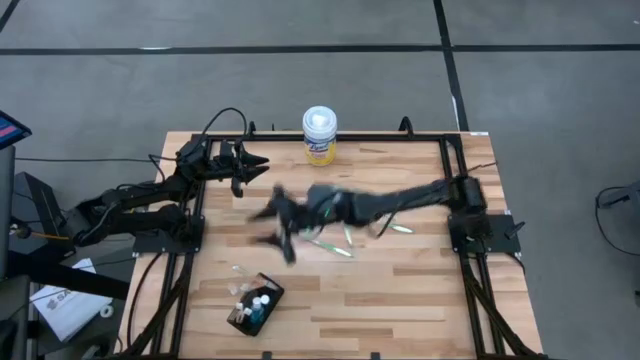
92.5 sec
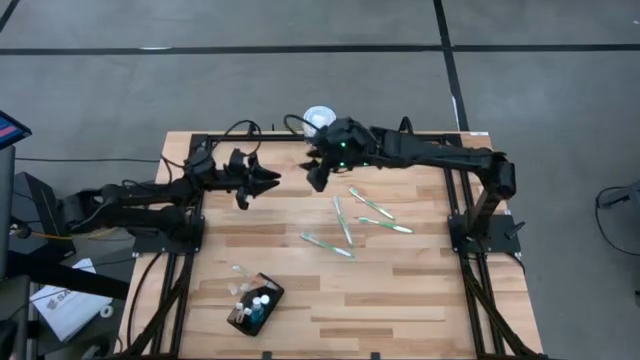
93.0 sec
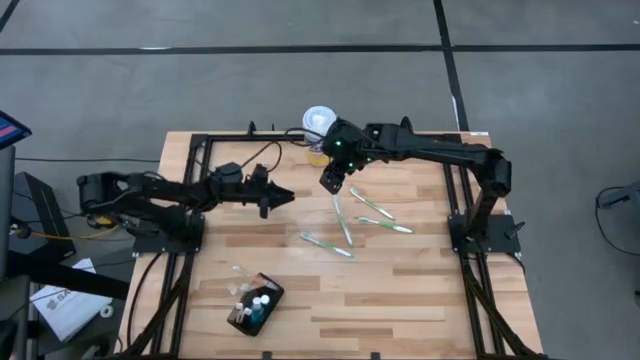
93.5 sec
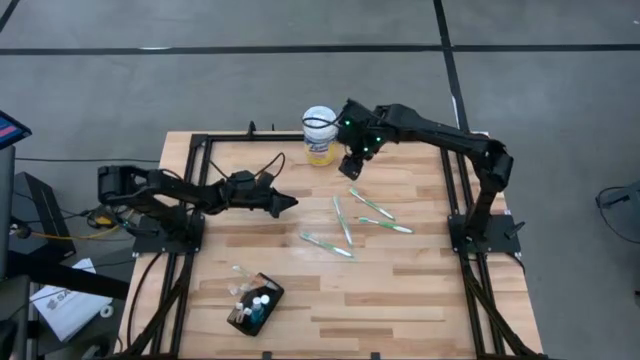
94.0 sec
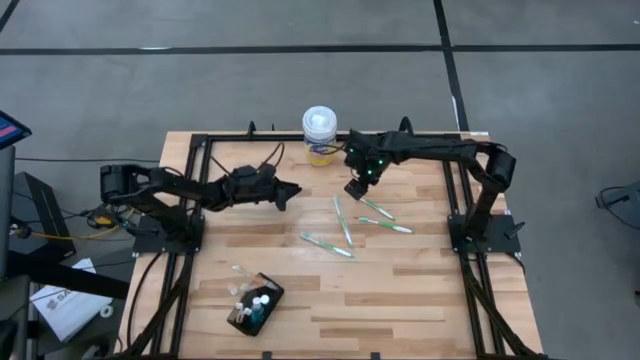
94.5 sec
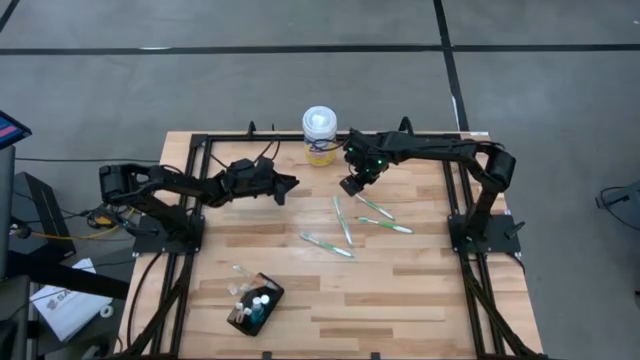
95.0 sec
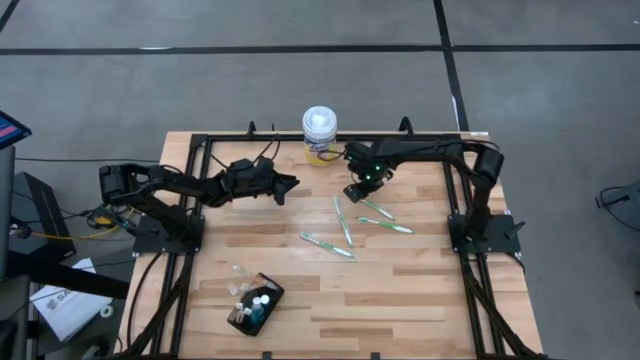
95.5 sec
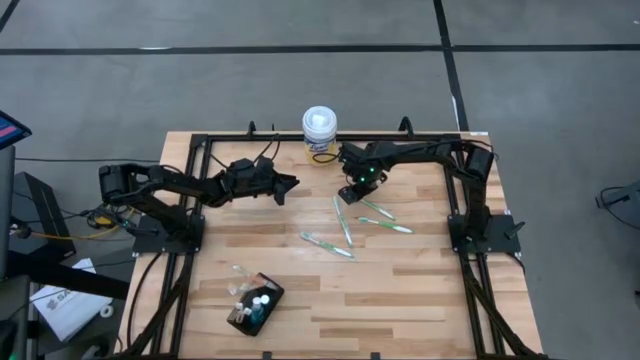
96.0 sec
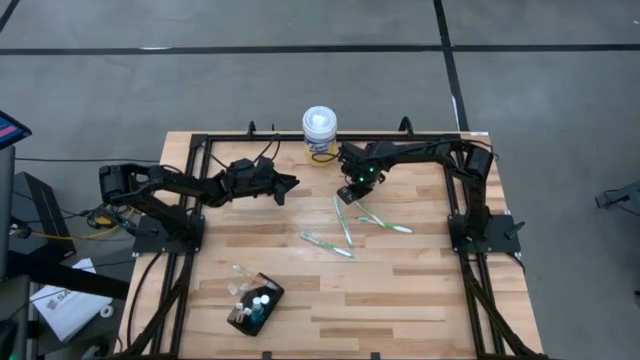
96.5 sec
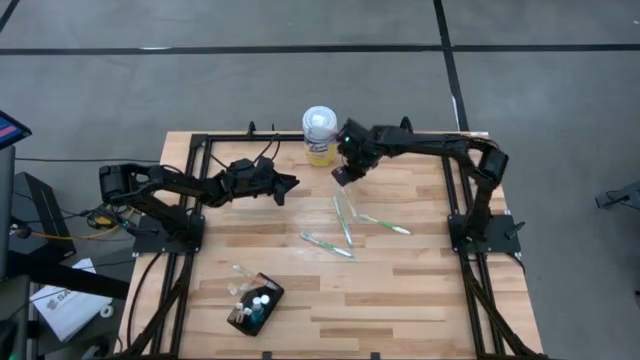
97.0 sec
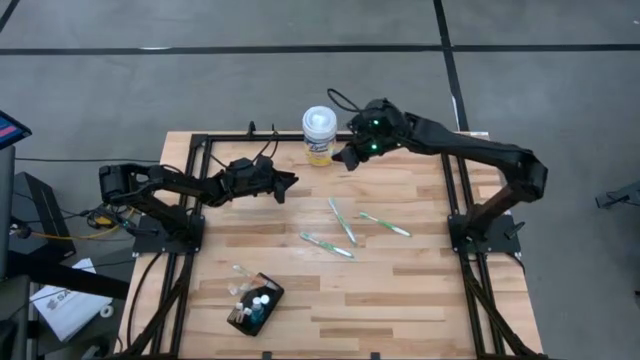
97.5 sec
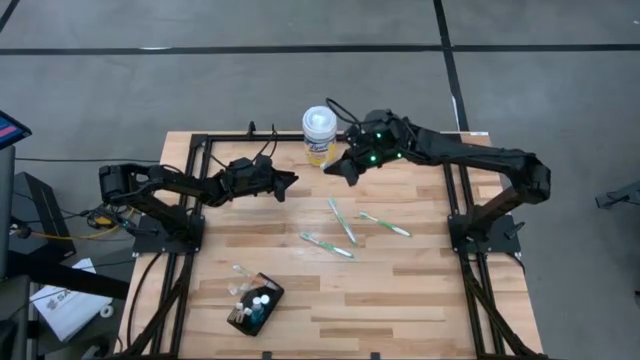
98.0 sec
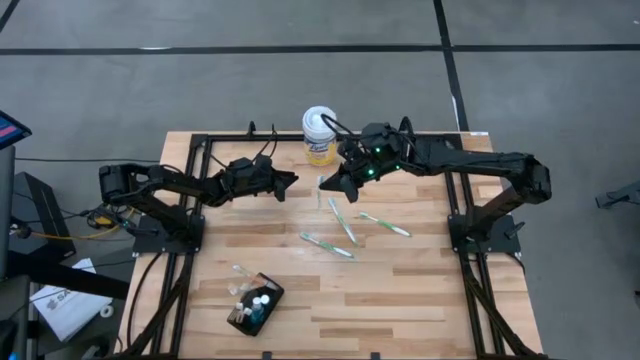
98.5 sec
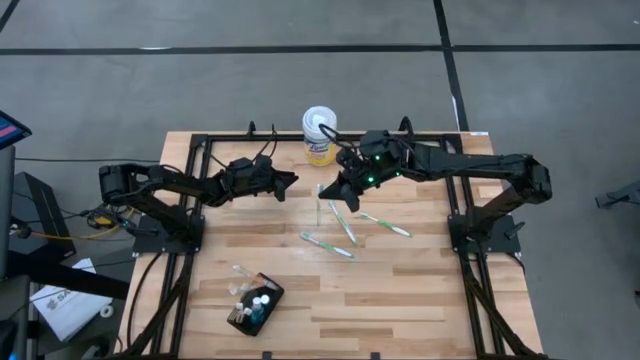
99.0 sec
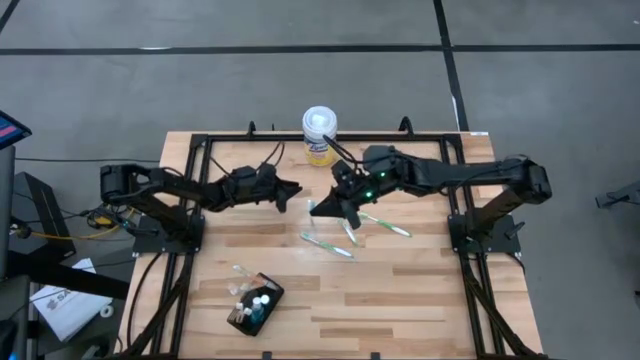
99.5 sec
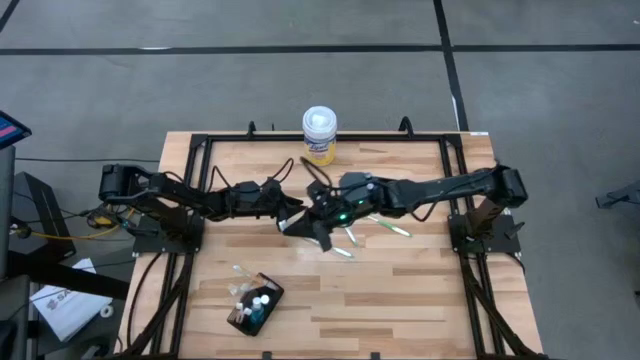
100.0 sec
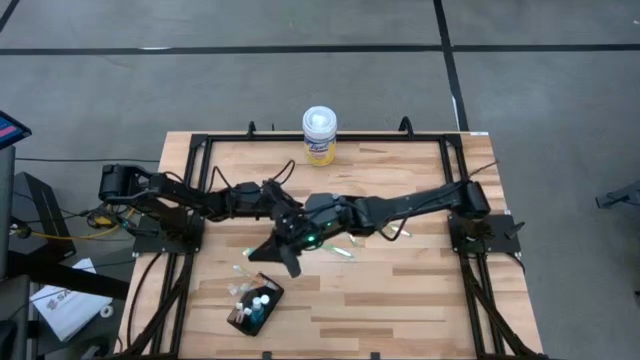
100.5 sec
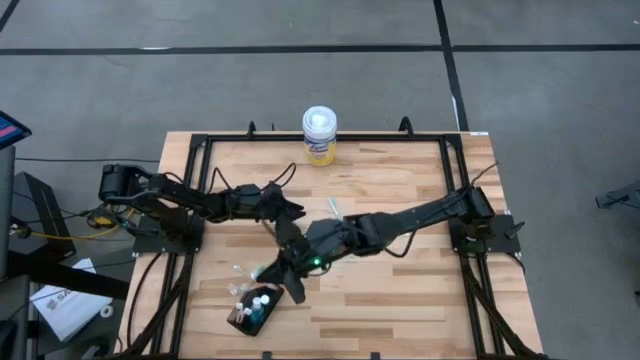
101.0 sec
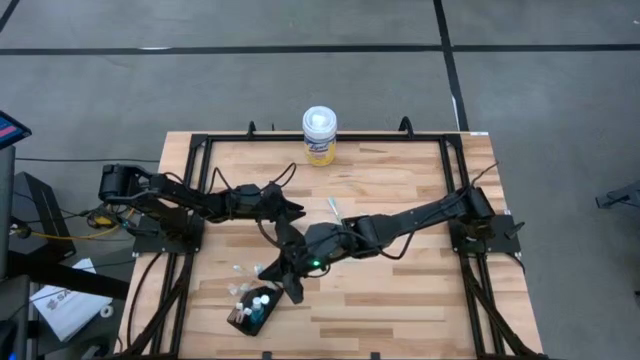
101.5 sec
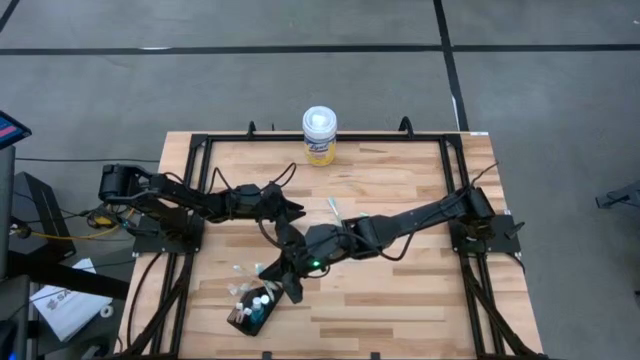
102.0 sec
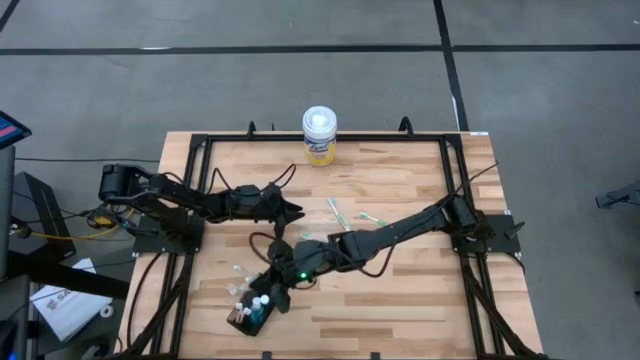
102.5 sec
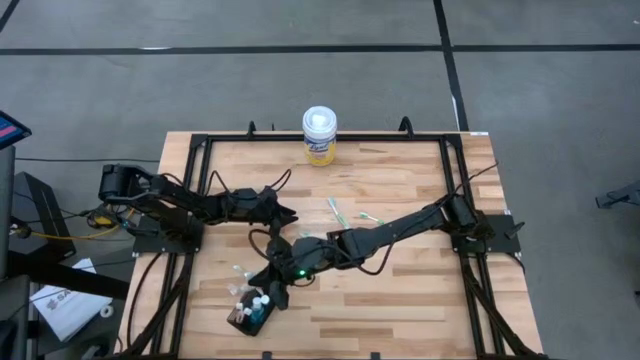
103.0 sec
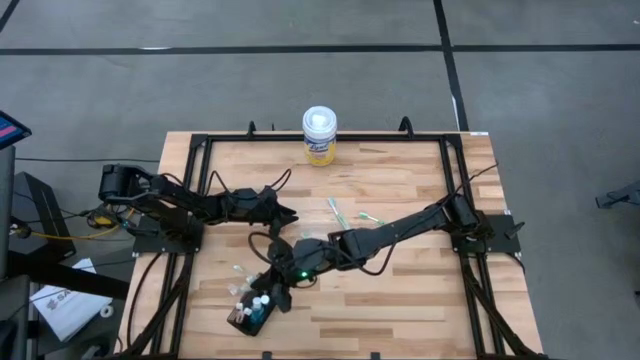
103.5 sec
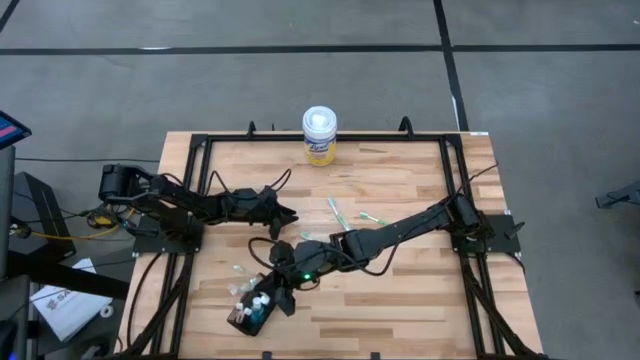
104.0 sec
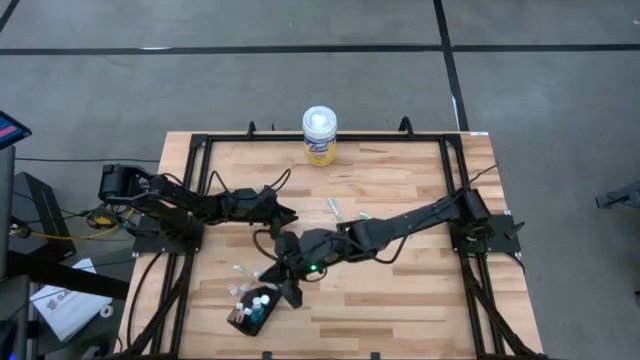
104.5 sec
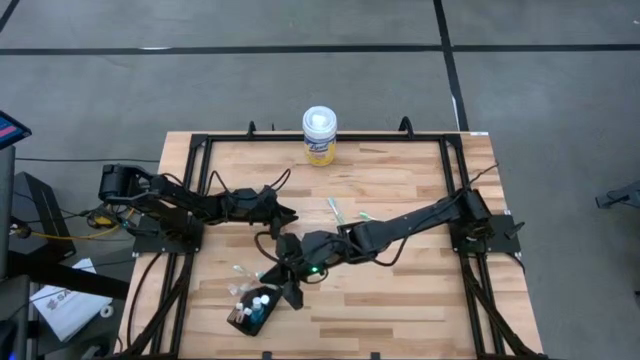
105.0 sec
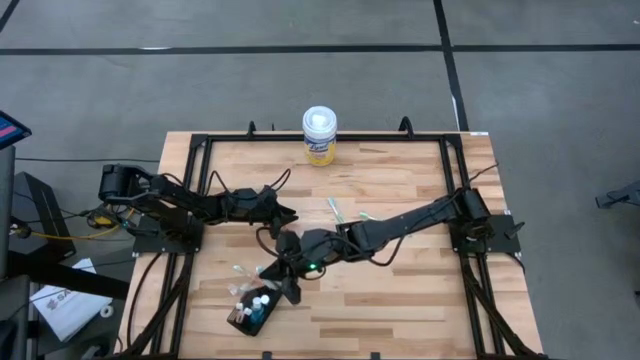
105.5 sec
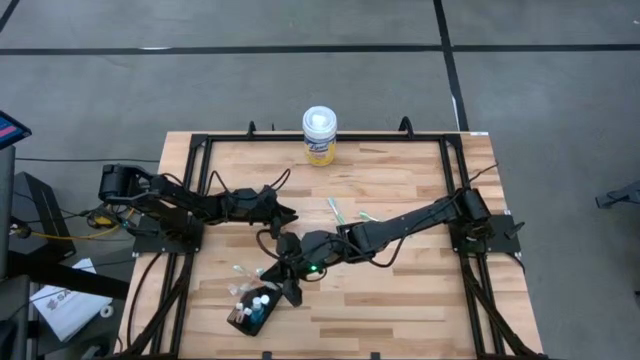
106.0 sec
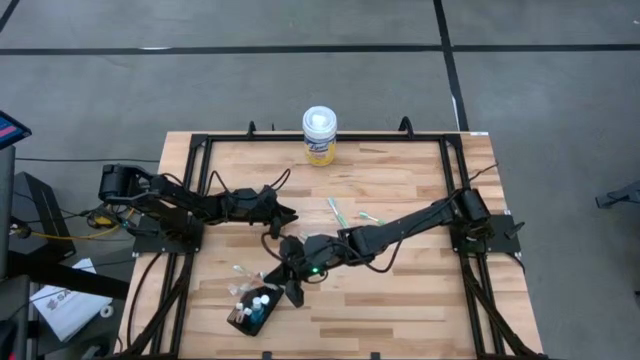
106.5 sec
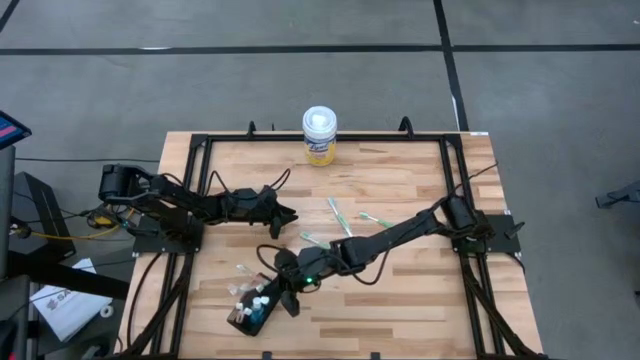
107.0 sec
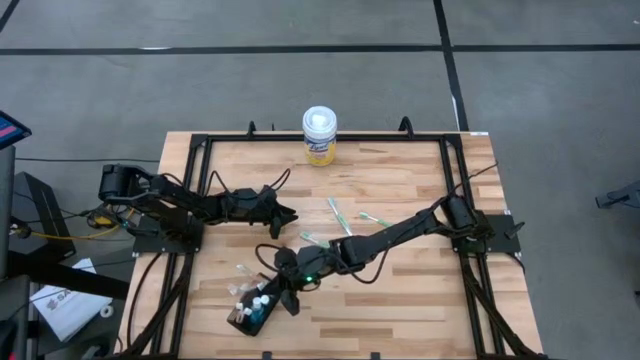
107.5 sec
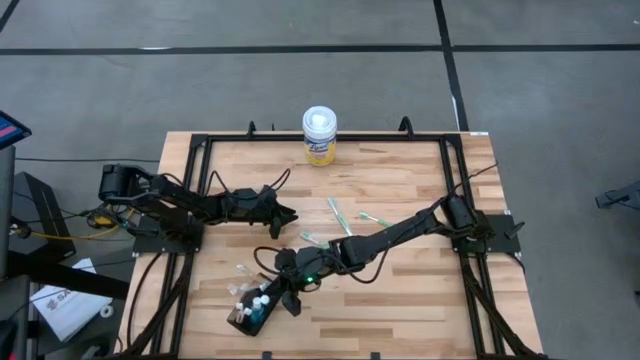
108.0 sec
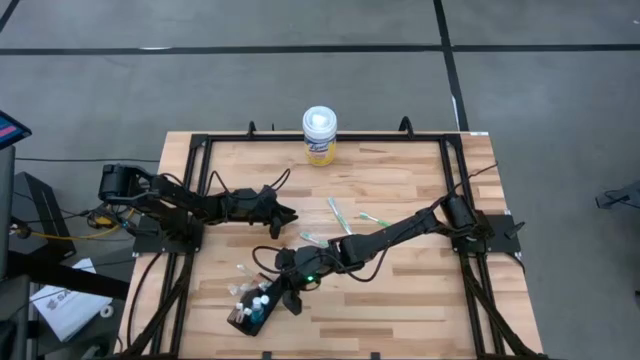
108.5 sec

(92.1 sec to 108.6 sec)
Task: Pick & Place toothbrushing station
Put the green toothbrush into the black wire organizer bin

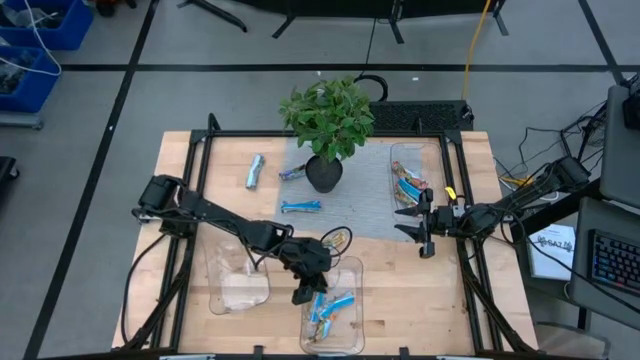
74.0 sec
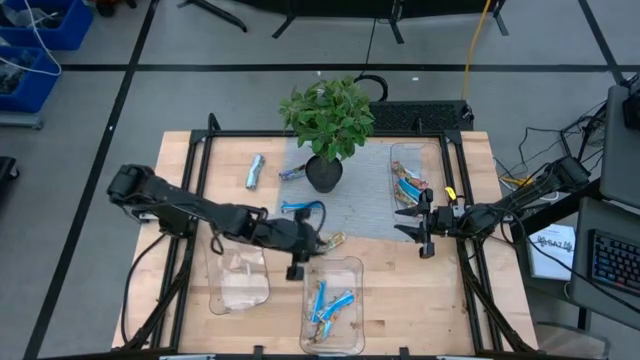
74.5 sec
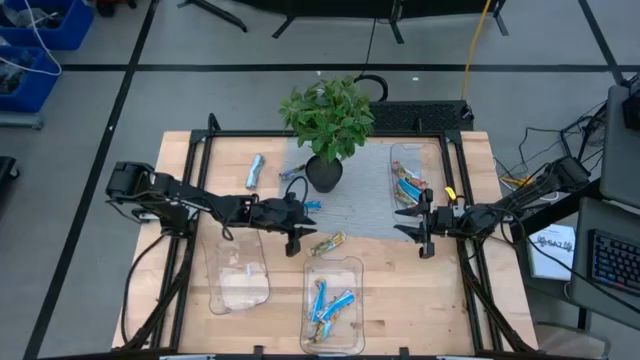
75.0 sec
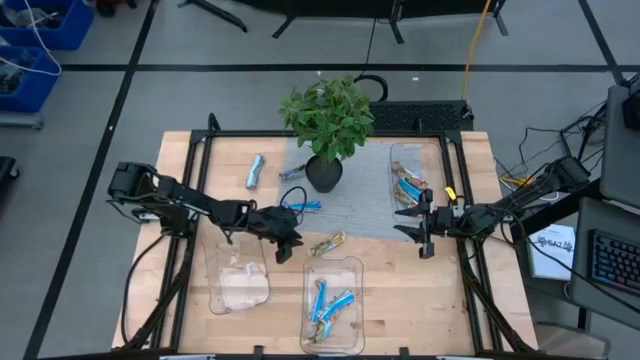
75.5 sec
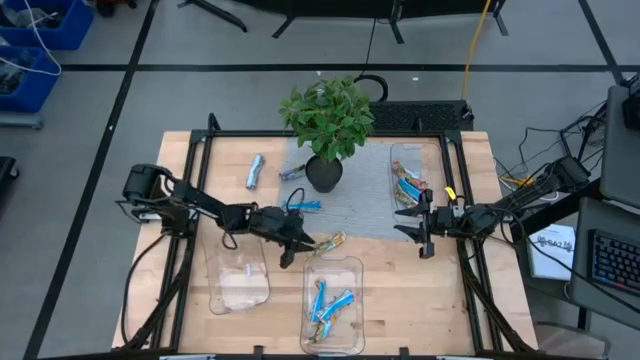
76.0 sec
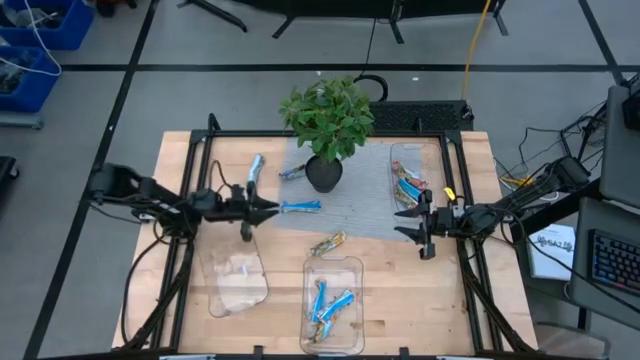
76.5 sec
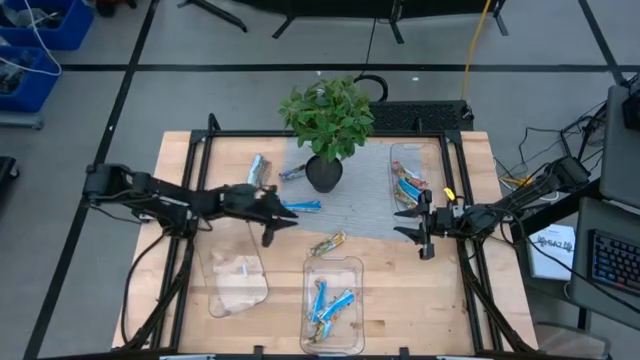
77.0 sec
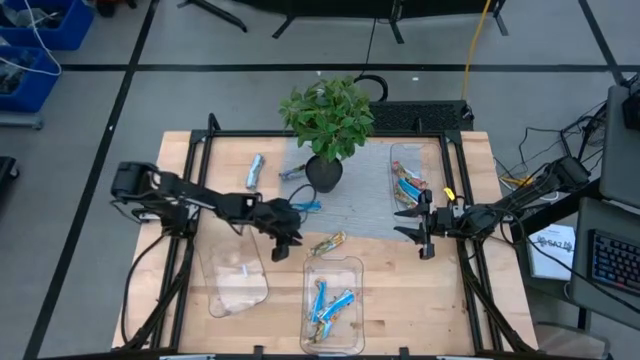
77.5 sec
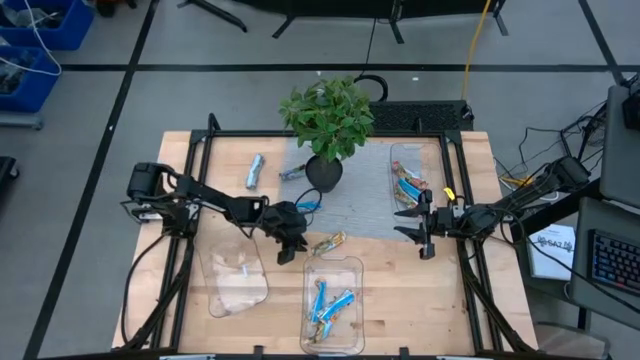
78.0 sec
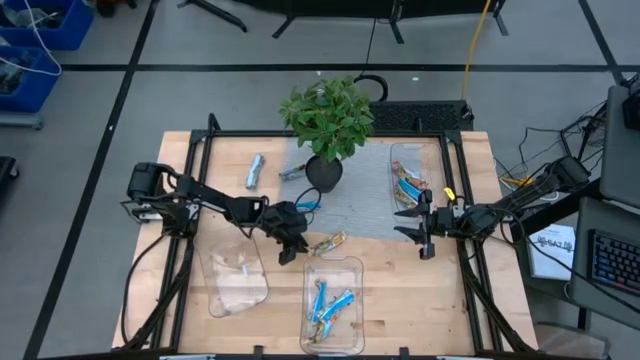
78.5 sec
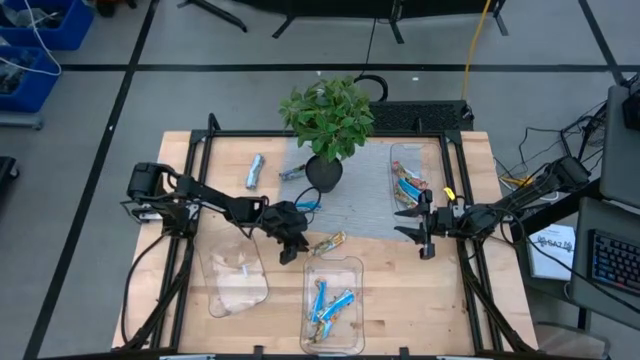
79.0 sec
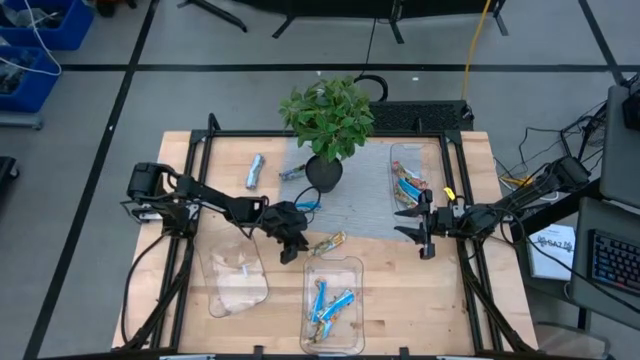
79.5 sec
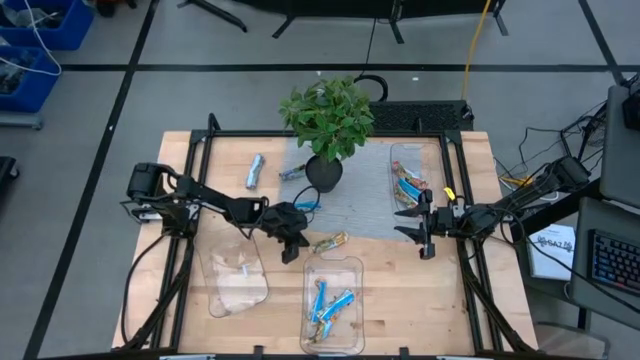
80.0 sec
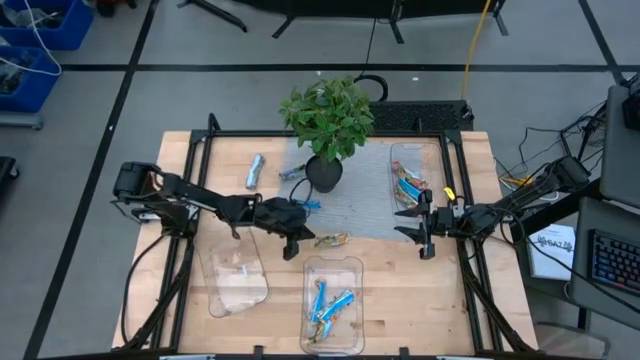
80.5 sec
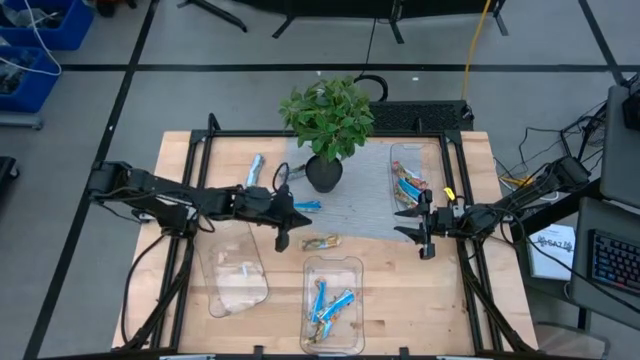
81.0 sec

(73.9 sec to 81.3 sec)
Task: Pick and place Granola Bars by type
Put the yellow granola bar into the middle transparent bin
